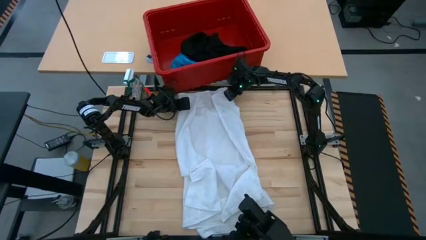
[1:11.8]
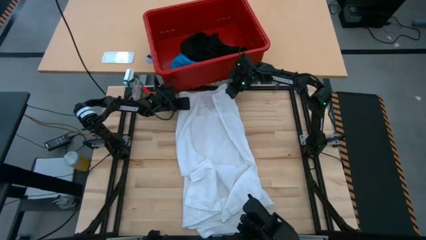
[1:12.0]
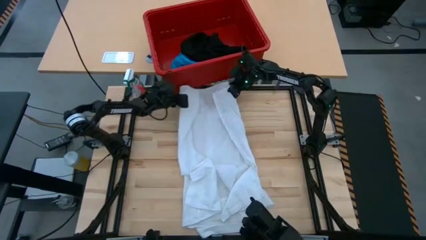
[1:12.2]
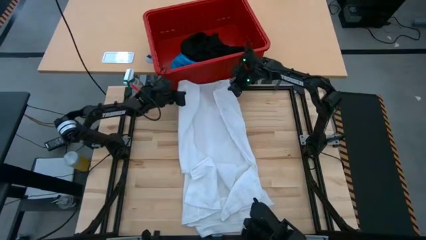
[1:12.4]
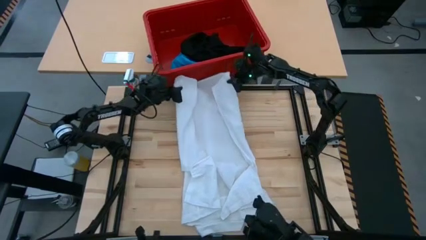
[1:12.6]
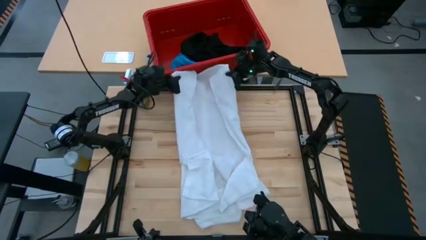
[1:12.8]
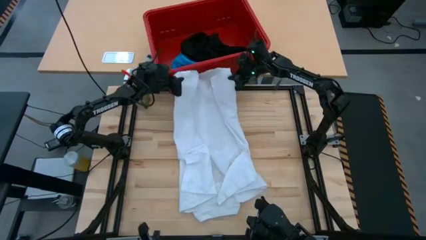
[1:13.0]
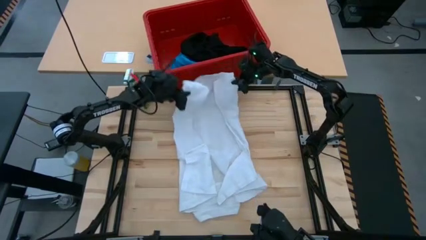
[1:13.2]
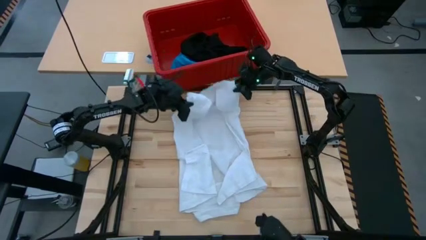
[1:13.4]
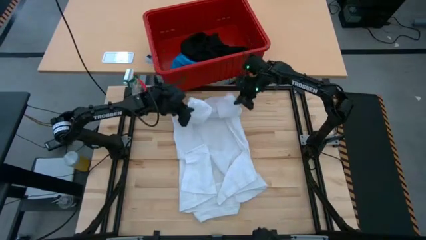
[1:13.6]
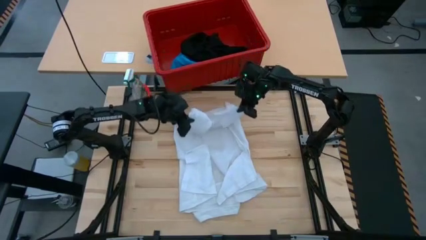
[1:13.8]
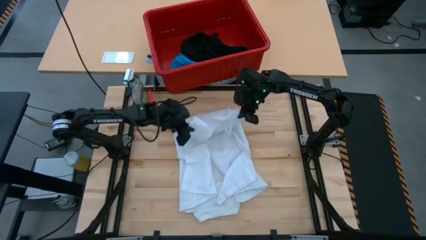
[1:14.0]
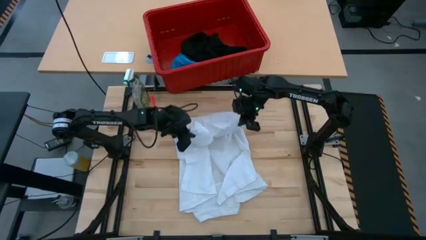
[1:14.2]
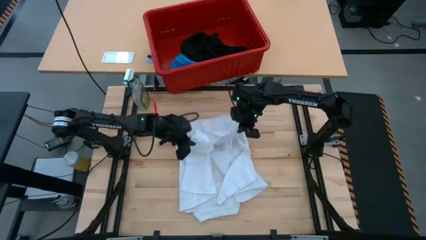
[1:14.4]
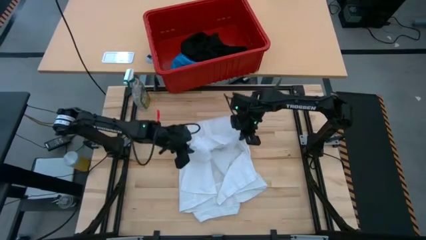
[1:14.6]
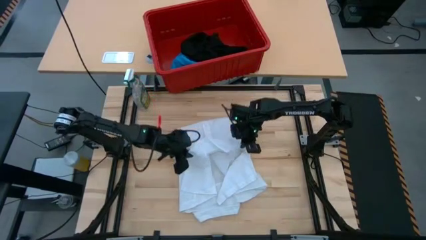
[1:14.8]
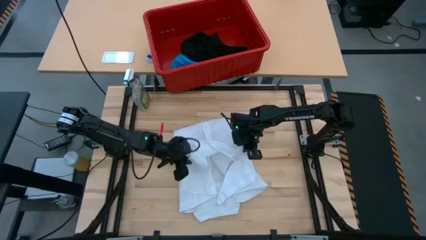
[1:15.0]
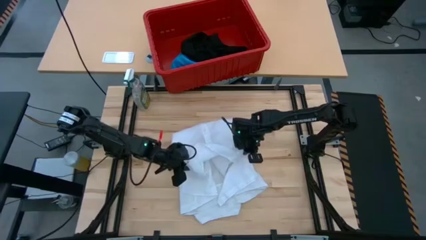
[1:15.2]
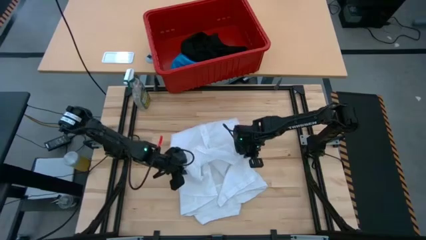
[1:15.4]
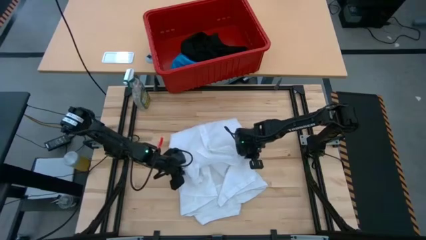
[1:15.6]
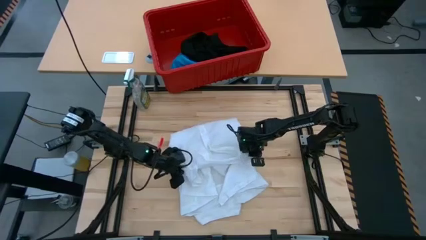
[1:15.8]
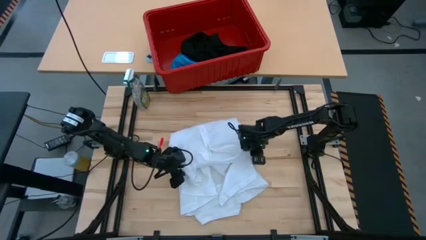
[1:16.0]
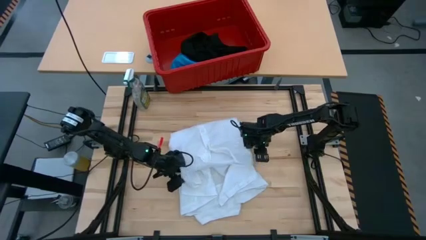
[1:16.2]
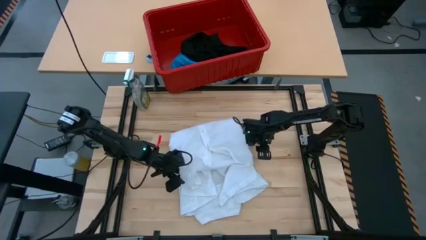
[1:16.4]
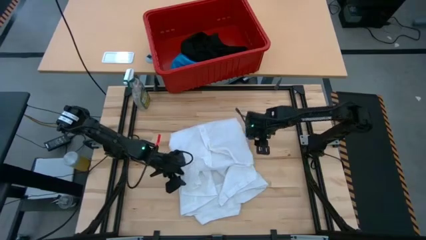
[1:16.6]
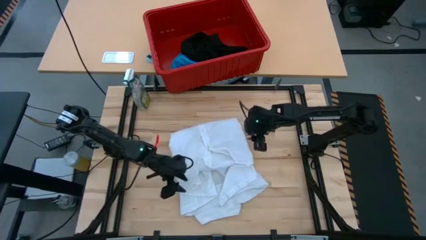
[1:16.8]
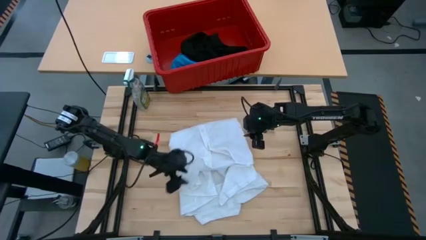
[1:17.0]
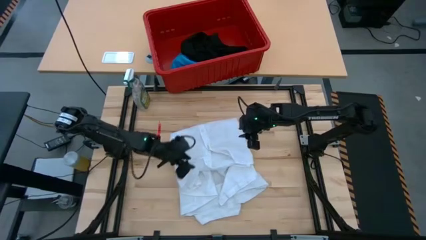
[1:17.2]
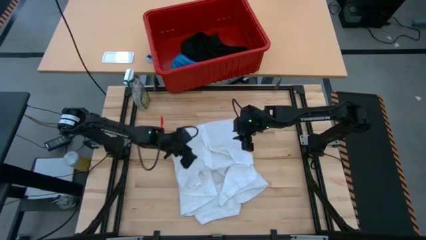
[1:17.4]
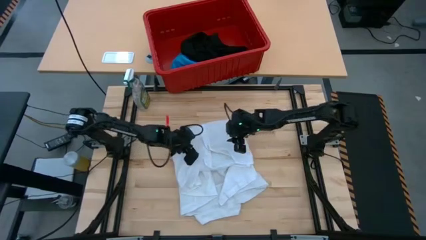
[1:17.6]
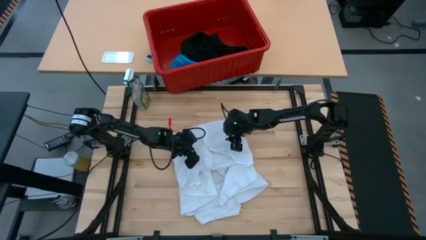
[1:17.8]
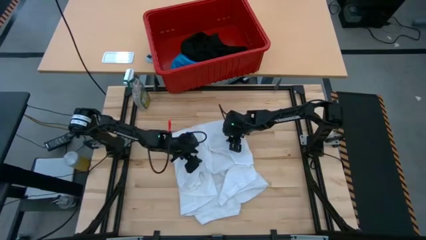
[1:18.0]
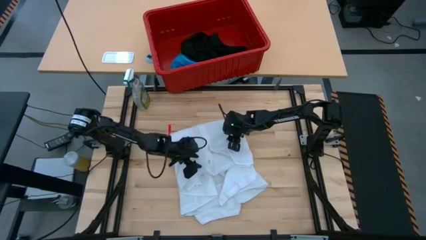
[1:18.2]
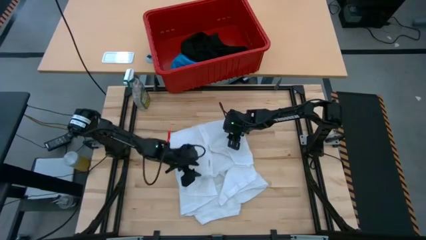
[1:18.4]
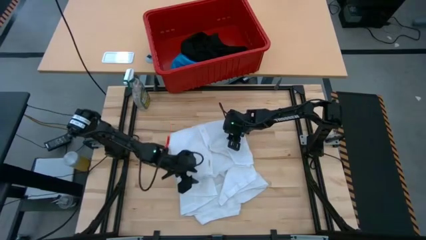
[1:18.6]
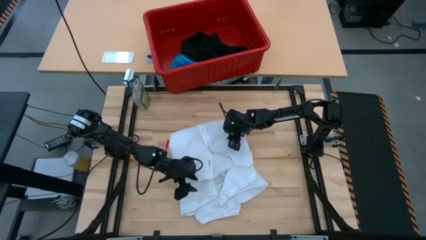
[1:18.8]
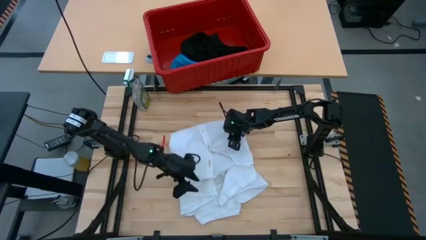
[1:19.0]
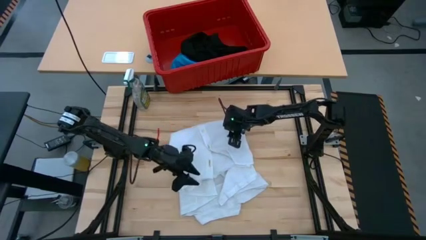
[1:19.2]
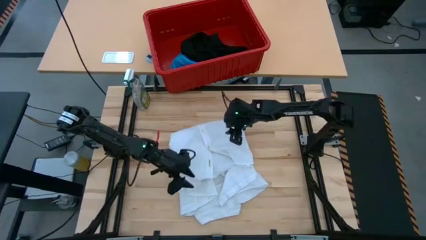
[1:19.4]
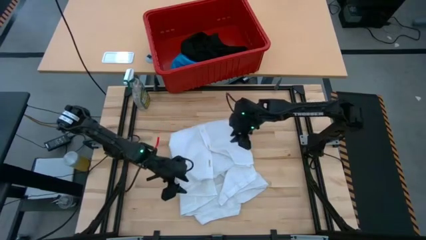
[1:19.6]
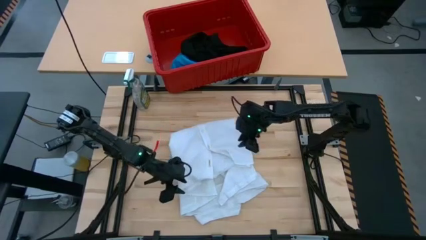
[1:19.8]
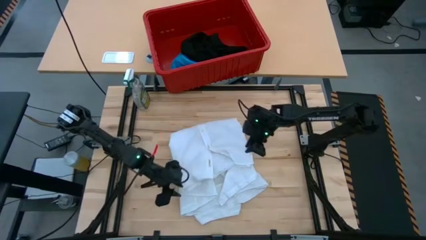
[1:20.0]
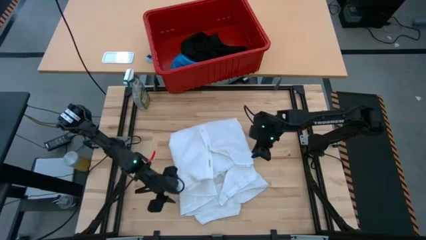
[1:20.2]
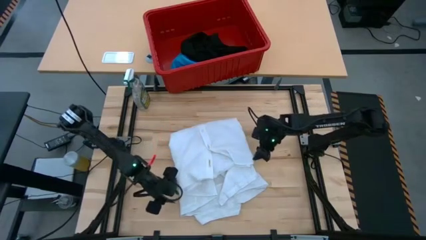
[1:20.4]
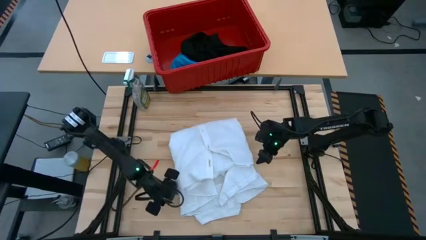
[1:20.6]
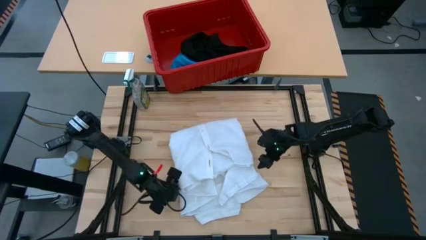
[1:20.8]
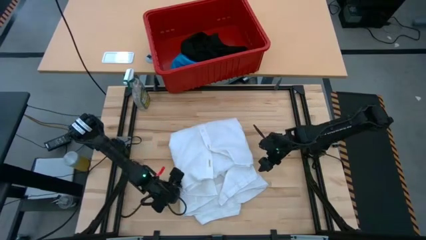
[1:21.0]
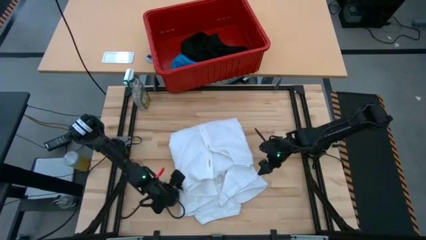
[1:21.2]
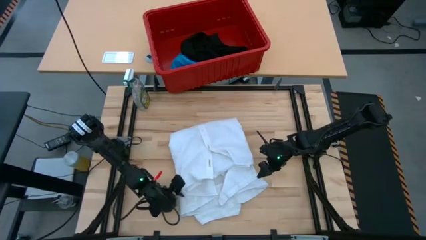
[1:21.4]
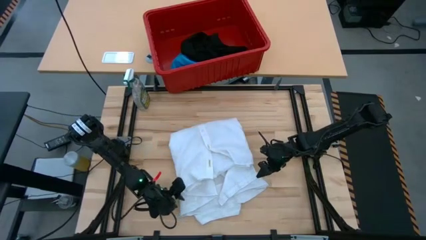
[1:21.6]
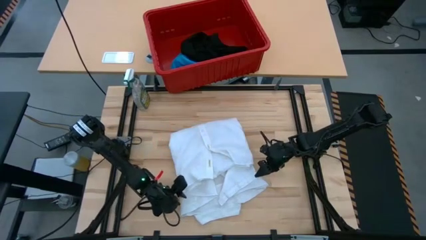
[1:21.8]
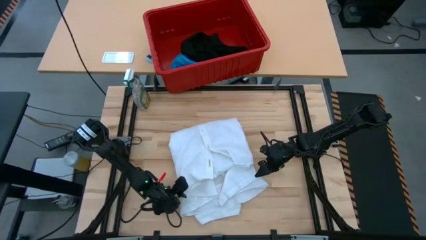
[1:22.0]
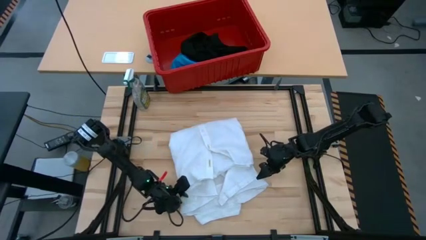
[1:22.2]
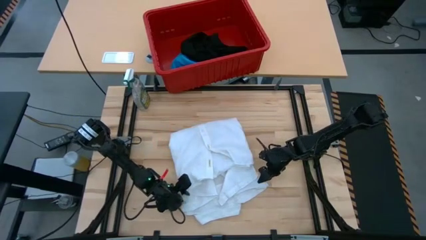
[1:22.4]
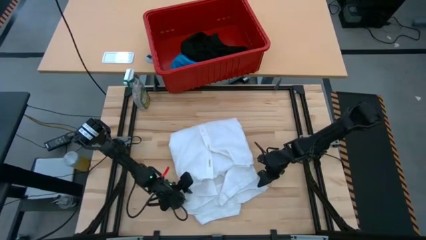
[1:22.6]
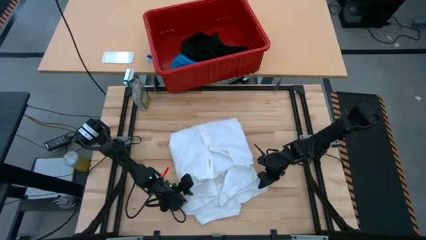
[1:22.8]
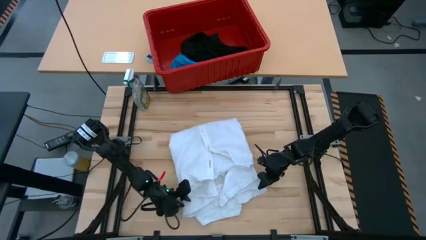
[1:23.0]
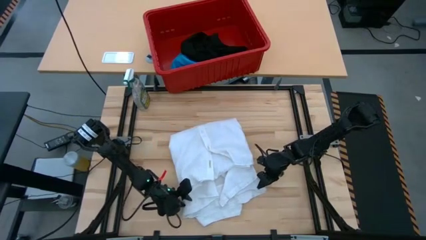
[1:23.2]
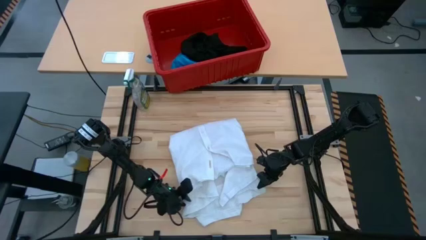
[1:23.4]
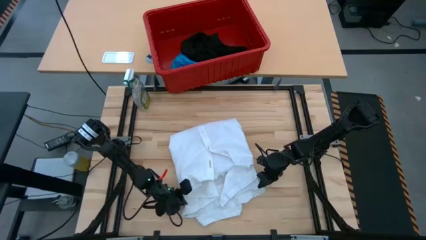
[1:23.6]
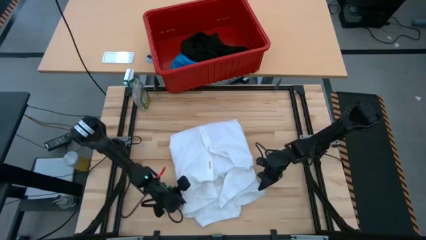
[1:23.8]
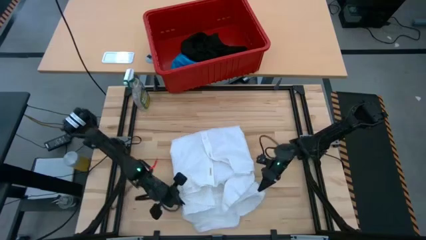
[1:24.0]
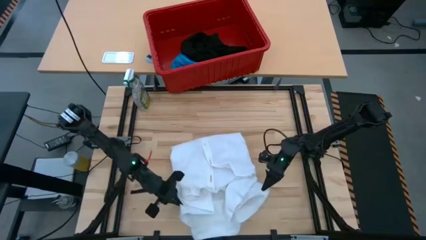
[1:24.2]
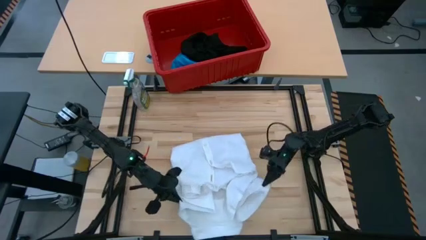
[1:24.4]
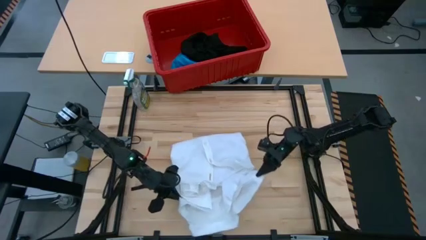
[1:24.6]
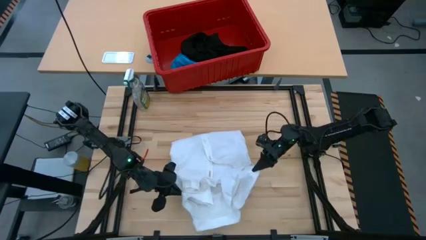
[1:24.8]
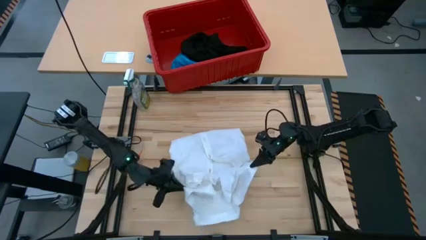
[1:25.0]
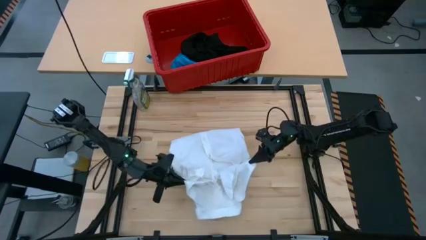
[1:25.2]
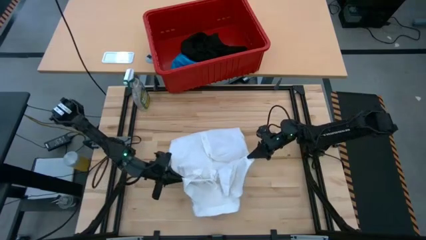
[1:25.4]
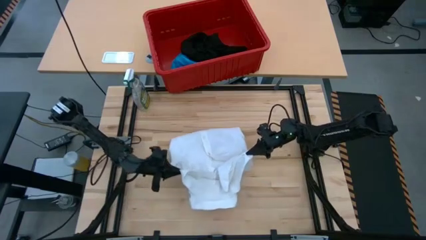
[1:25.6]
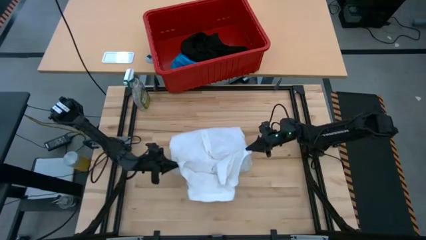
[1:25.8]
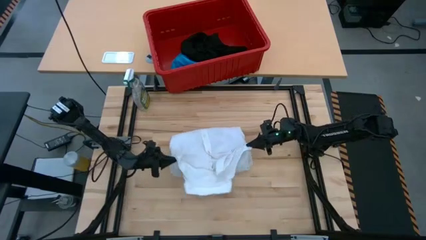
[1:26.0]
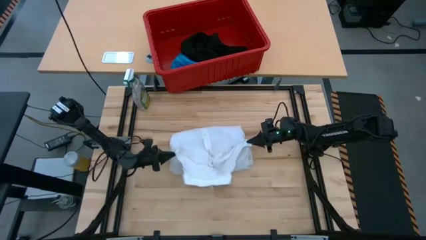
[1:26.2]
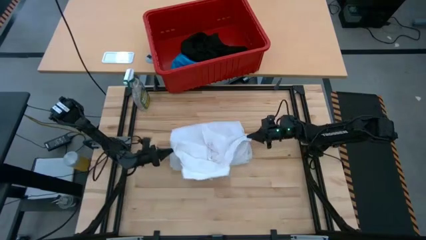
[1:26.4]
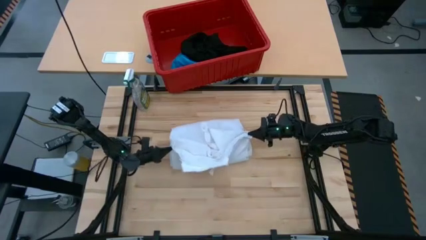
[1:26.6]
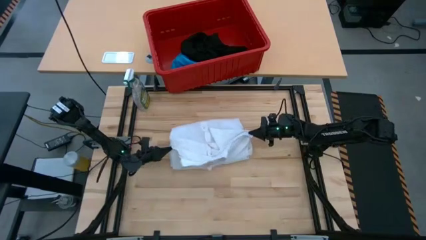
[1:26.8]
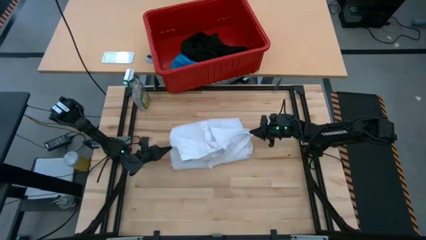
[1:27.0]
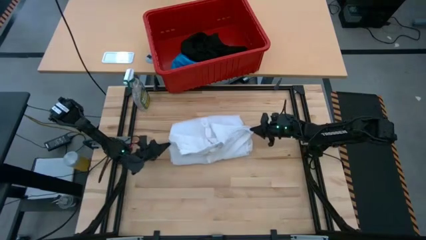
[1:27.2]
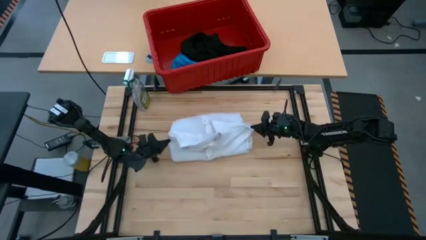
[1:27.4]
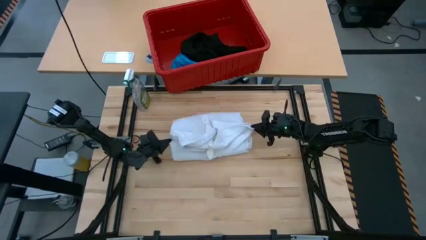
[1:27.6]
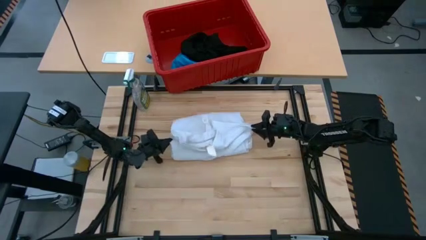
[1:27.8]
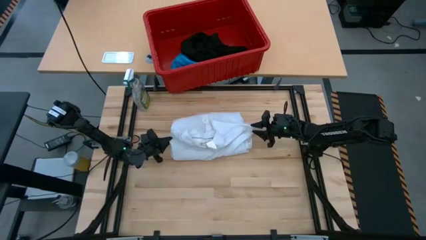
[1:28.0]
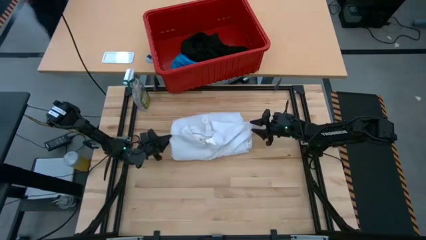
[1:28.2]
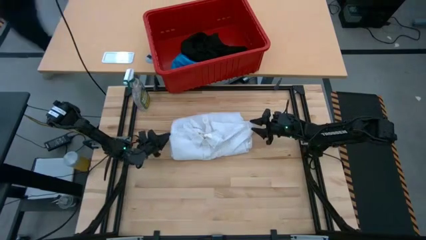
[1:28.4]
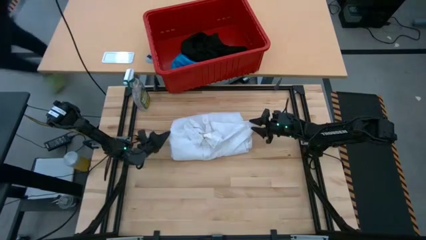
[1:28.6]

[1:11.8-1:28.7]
Task: Fold laundry
Fold the white polo shirt
